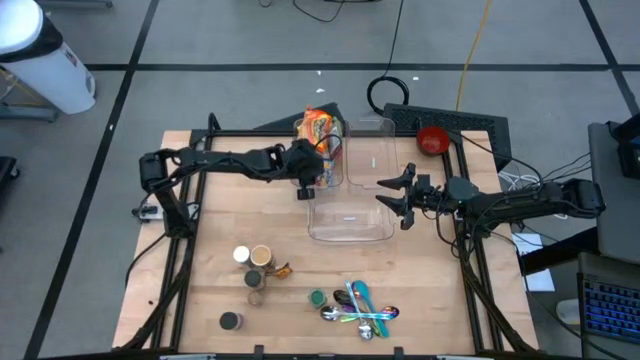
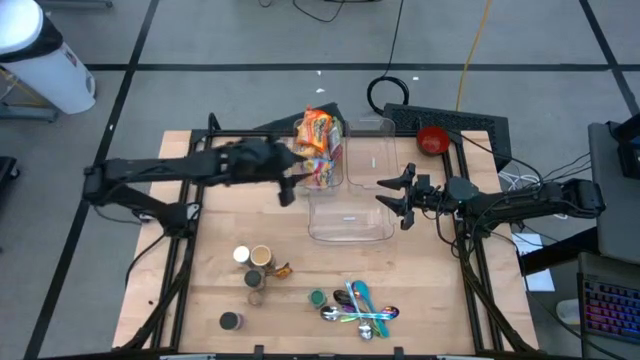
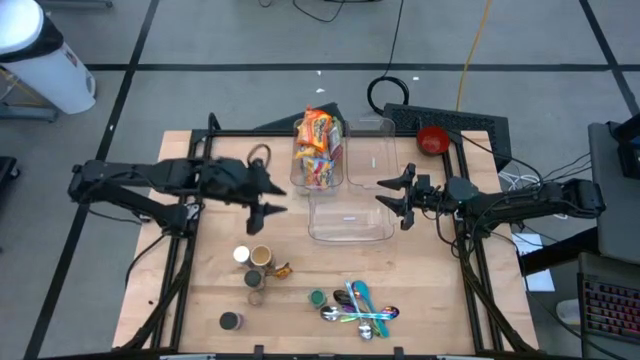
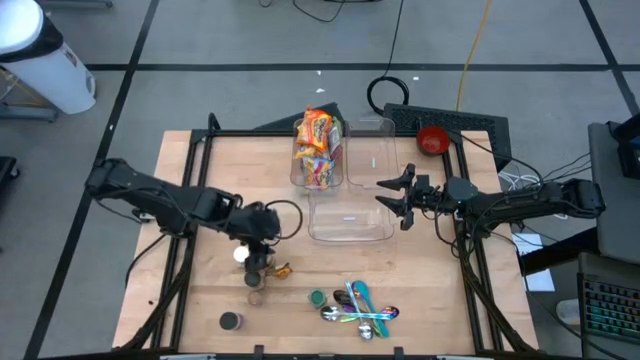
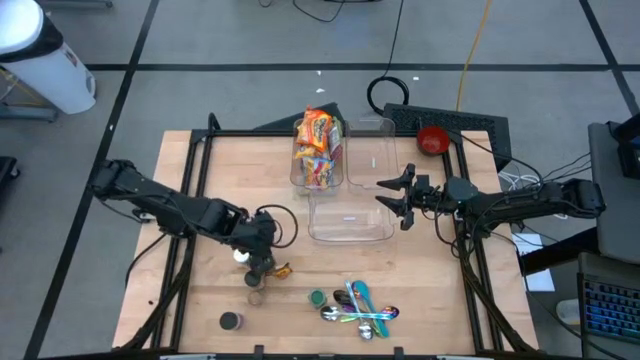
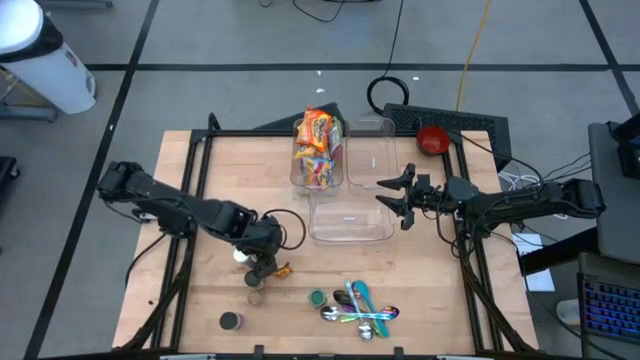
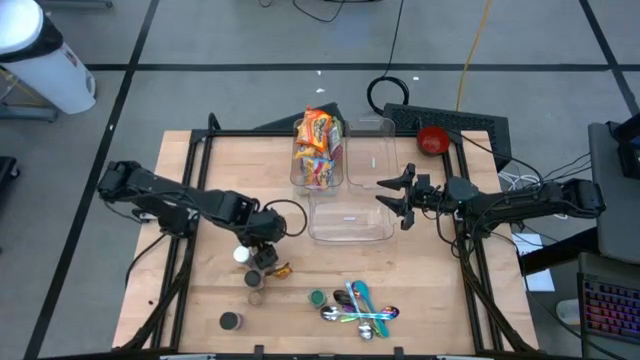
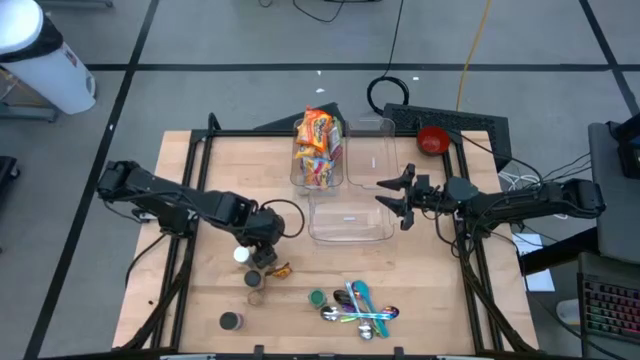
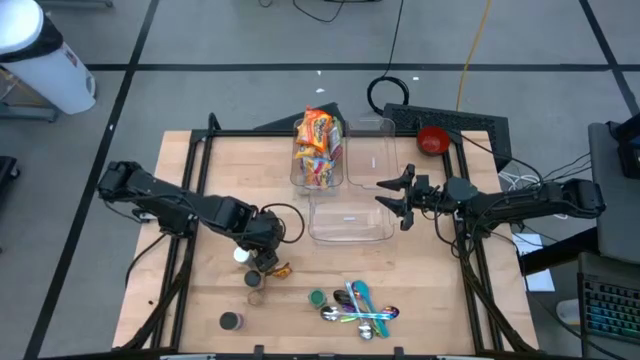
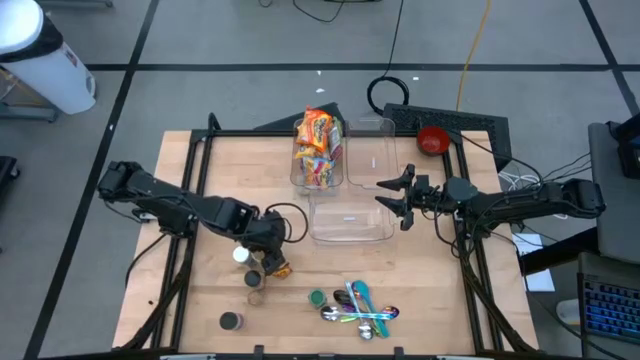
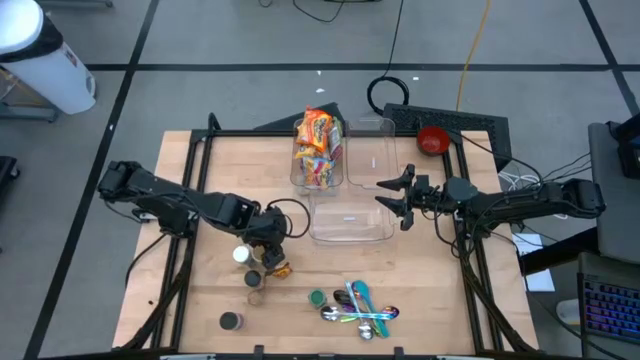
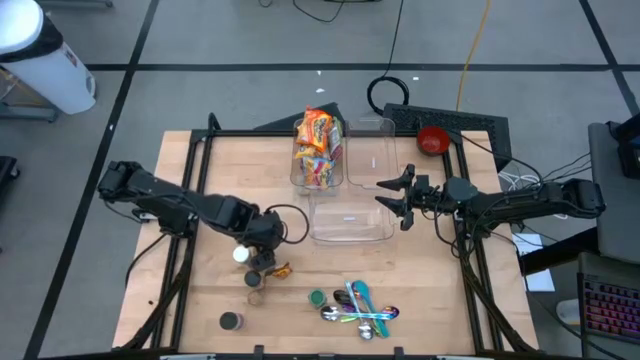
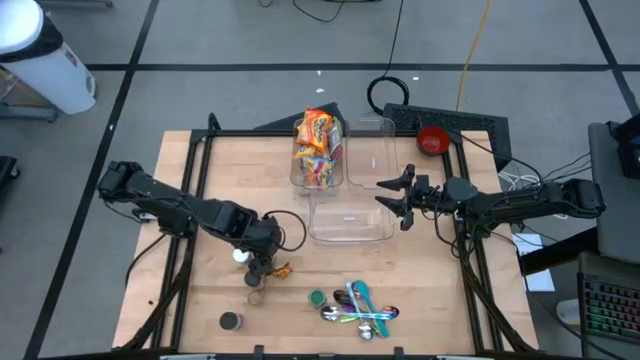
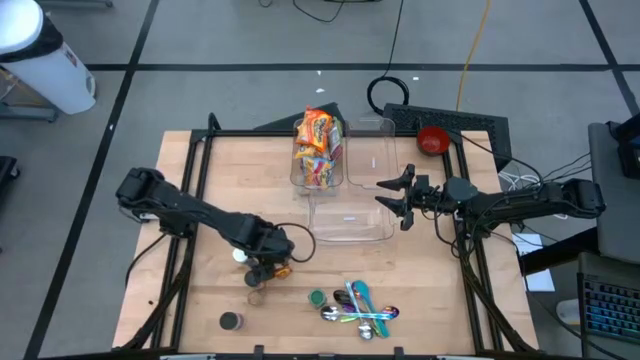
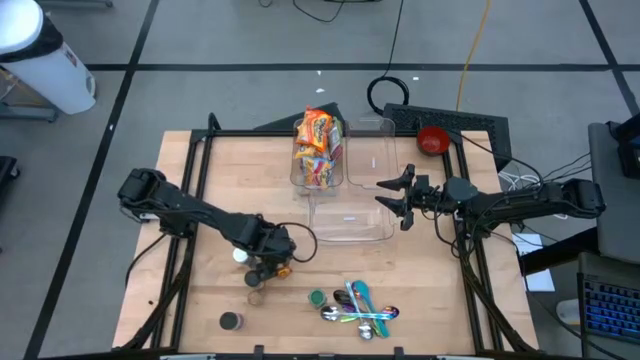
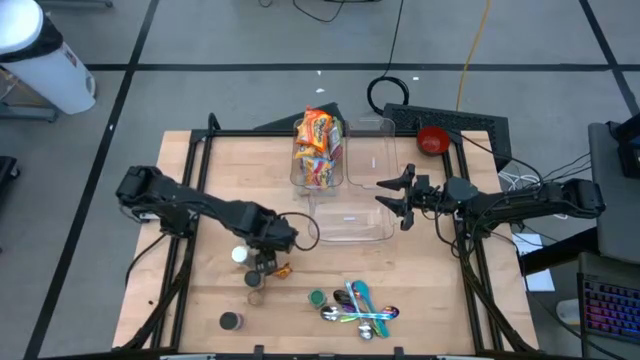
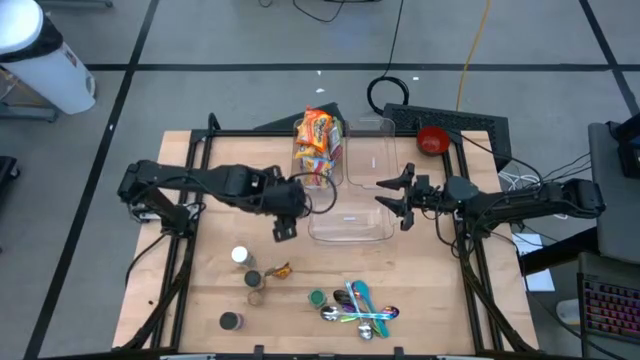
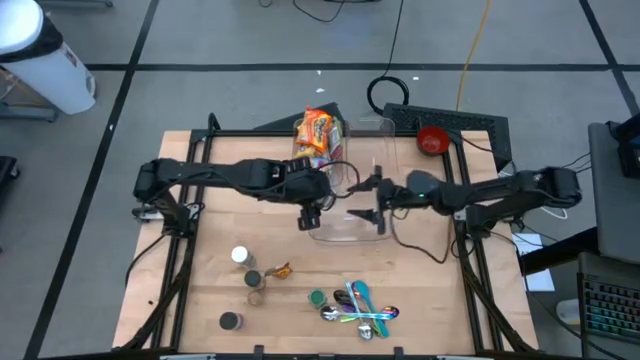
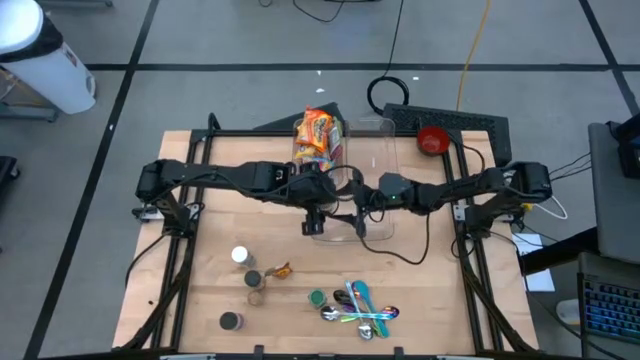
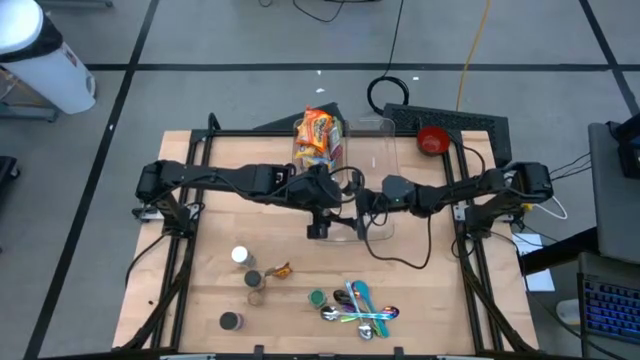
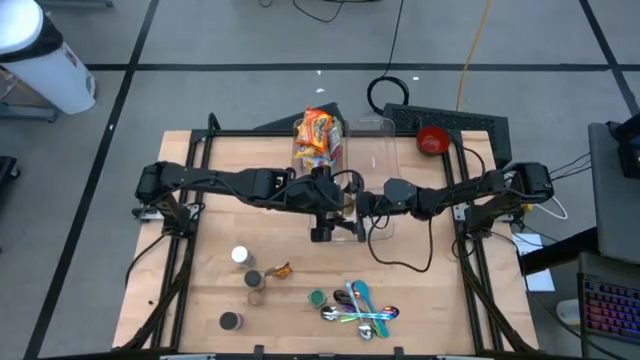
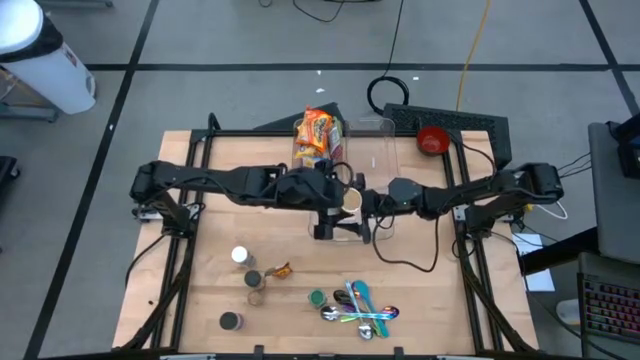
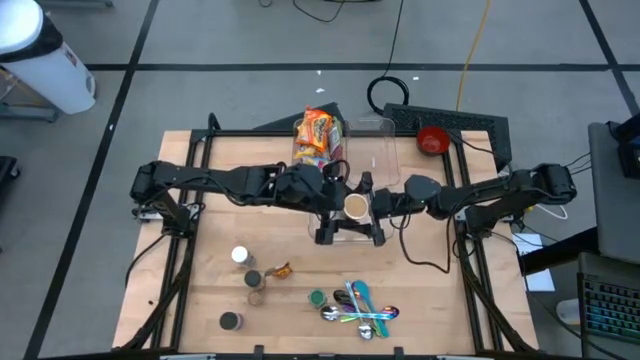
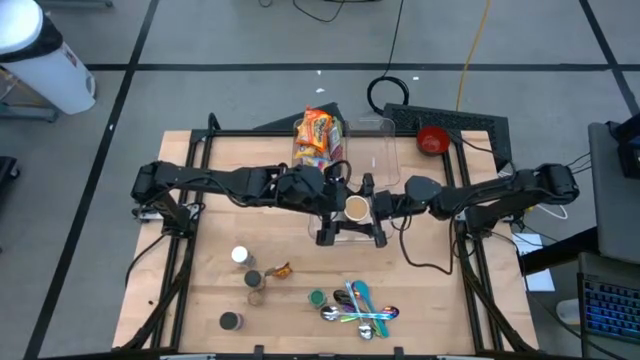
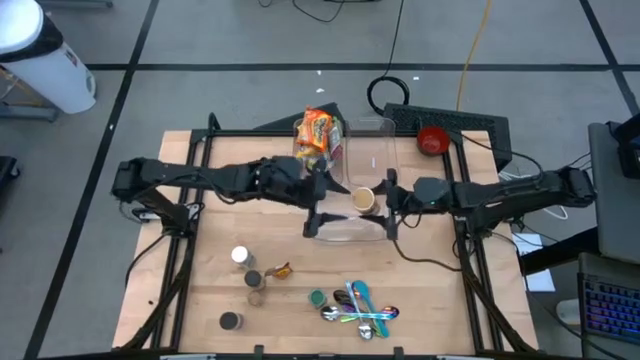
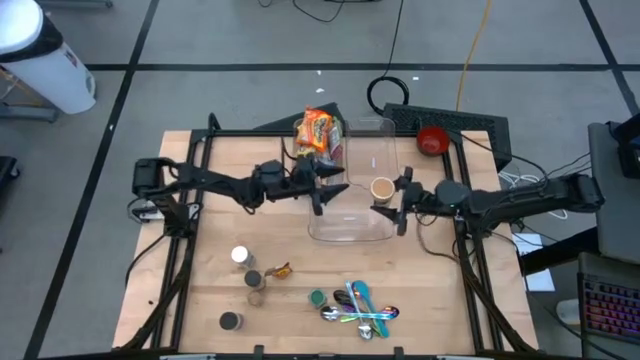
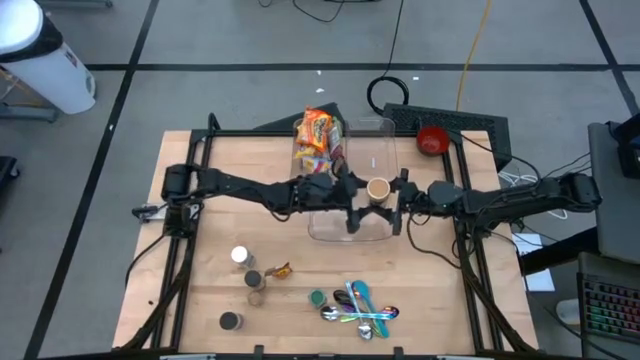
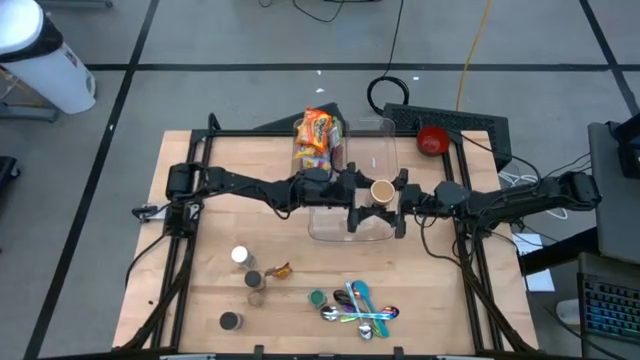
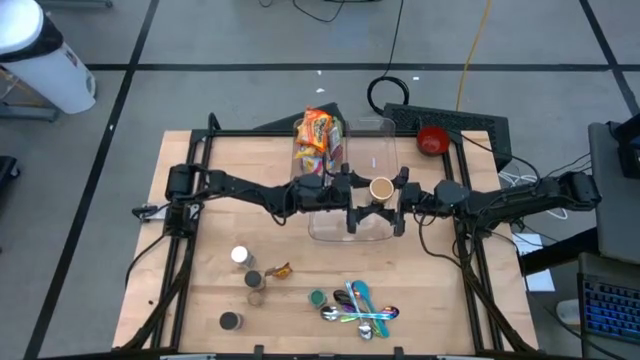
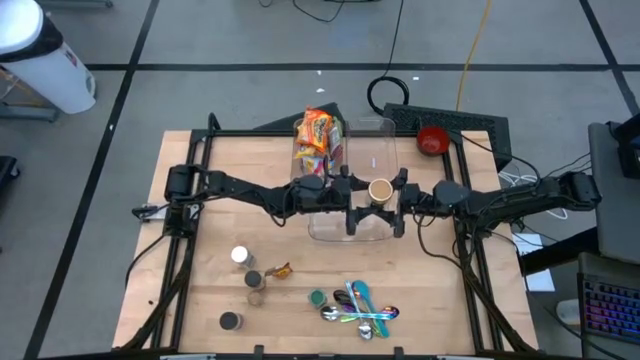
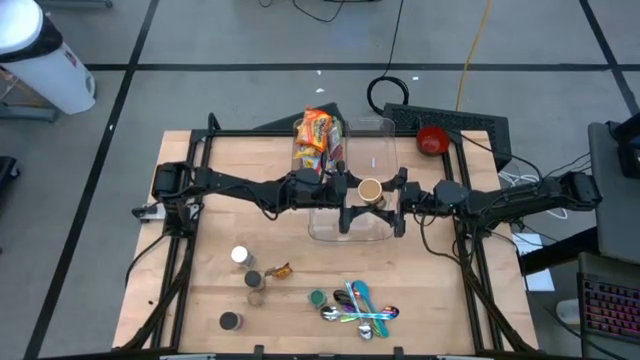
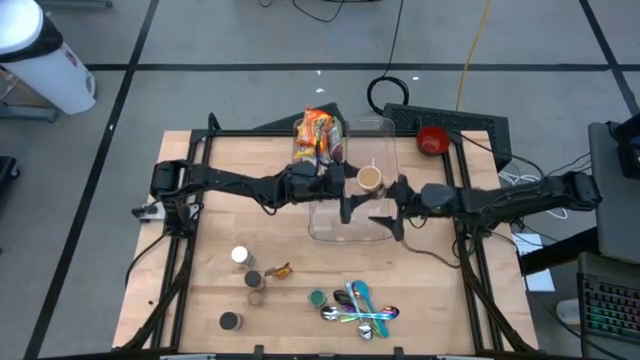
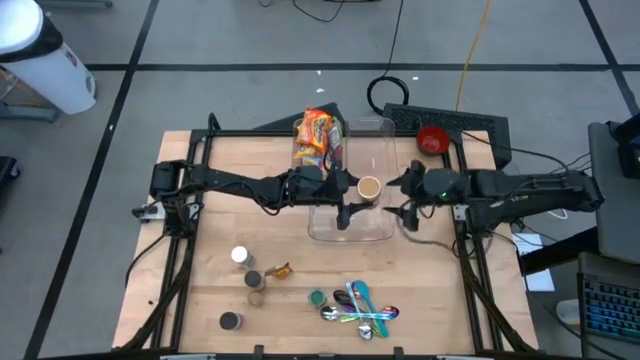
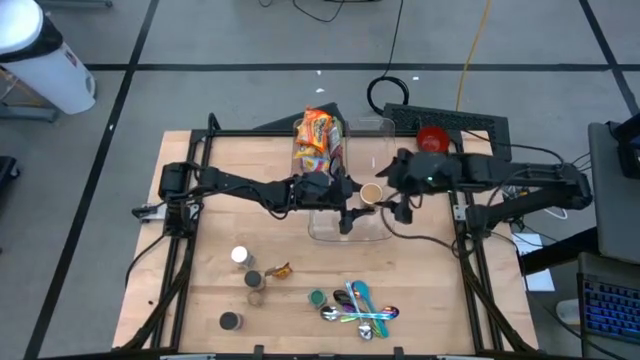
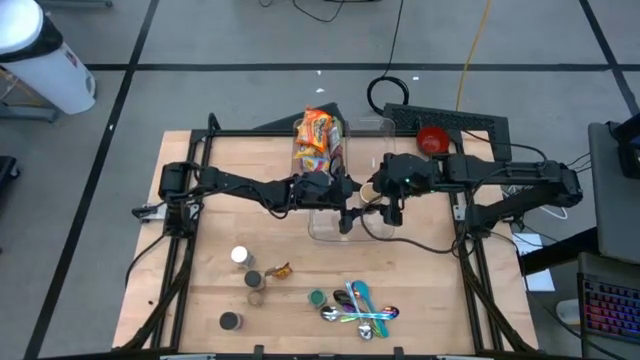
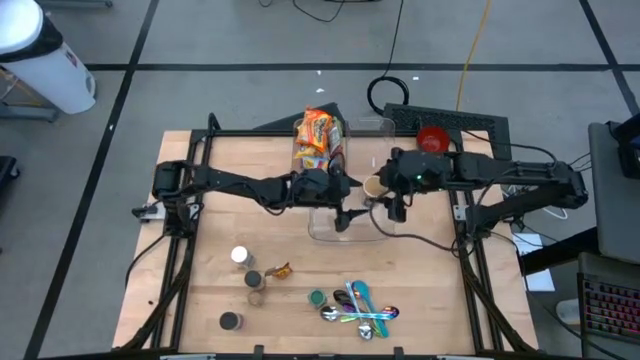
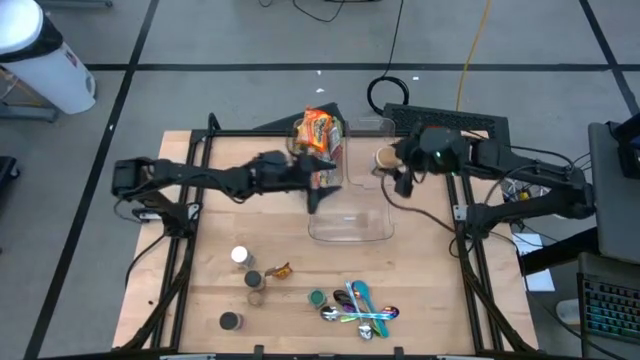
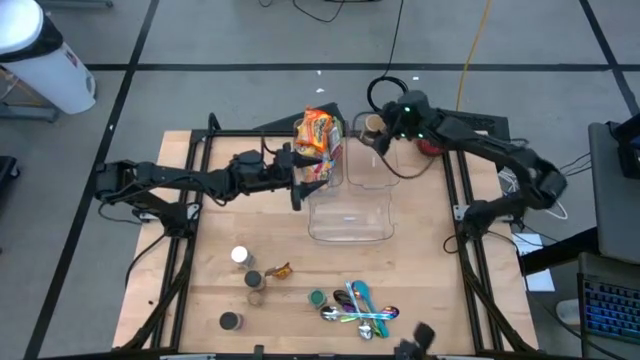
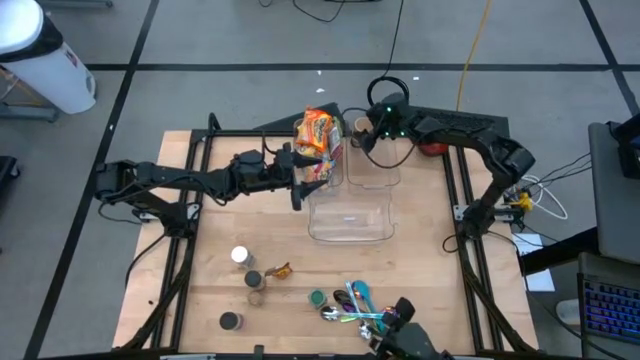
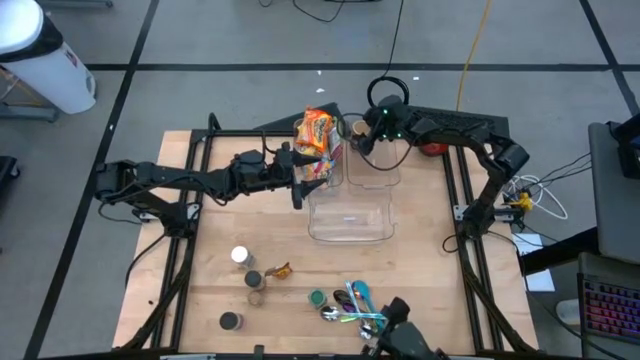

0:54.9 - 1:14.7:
Task: Pick & Place Food Item
Put the gold seasoning bottle into the right transparent bin

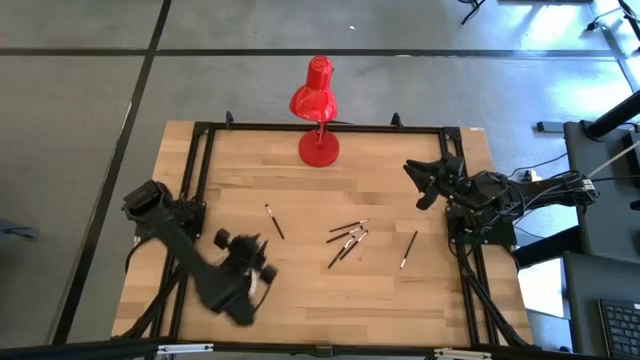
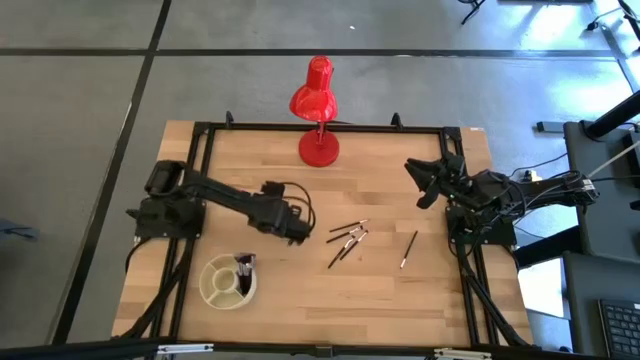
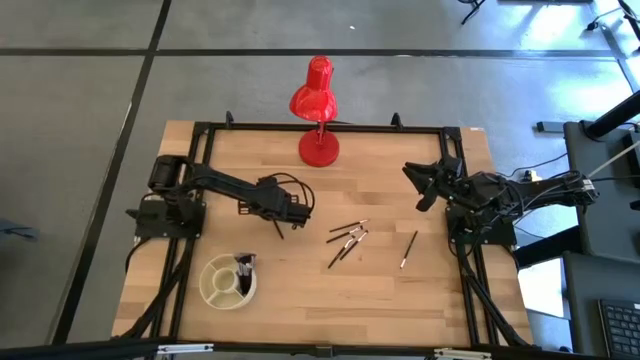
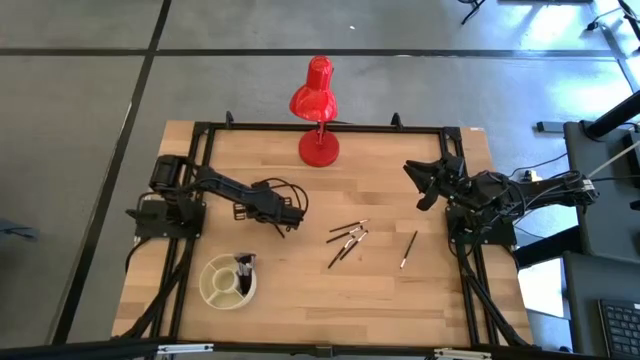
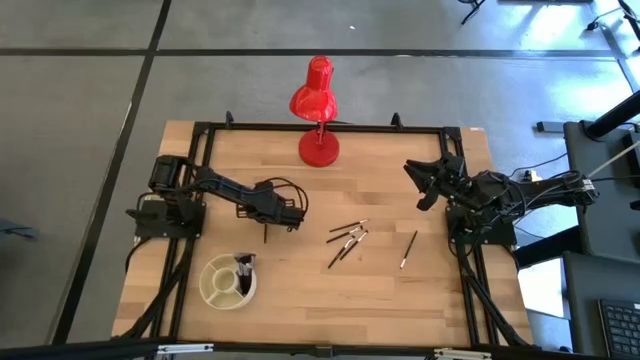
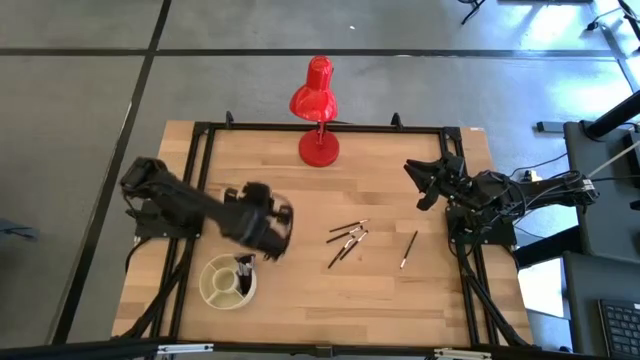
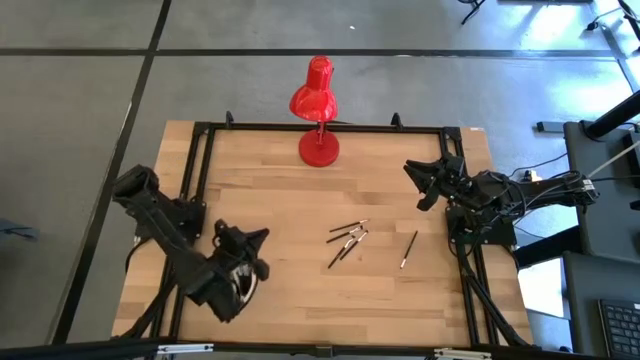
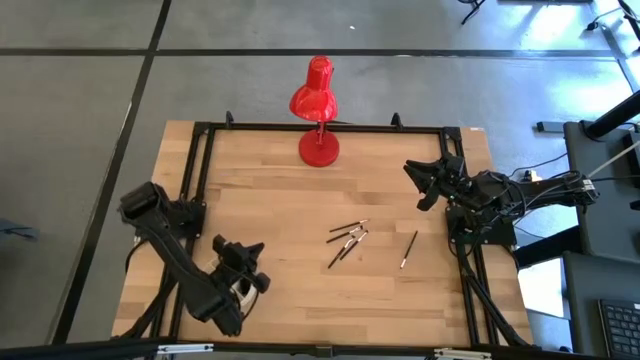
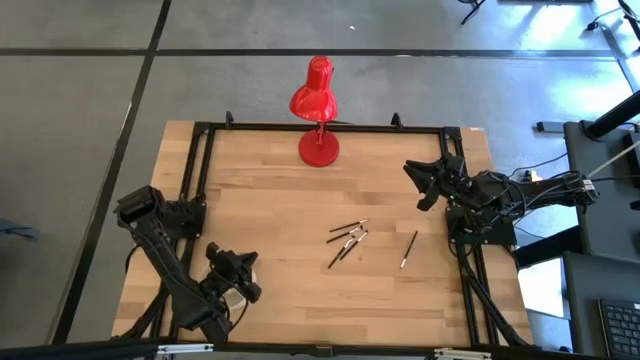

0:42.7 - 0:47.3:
Task: Put items in baskets/containers
Put the eyeshadow brush into the pen organizer
